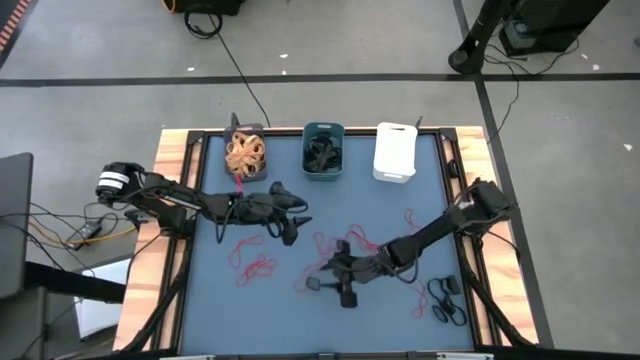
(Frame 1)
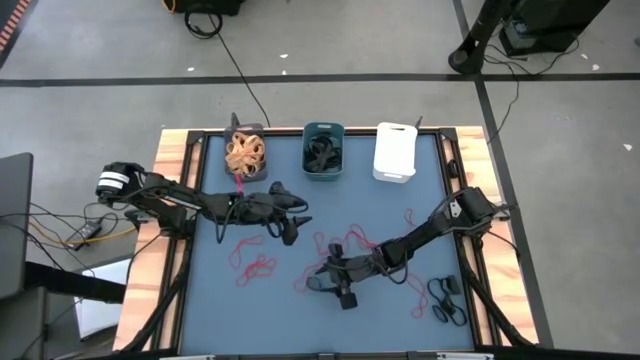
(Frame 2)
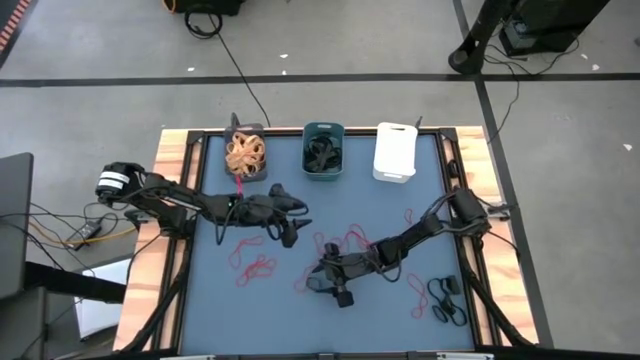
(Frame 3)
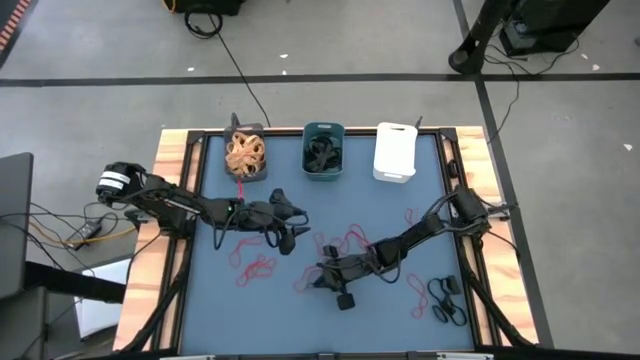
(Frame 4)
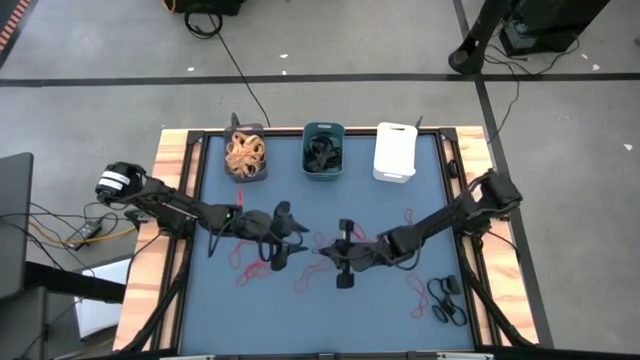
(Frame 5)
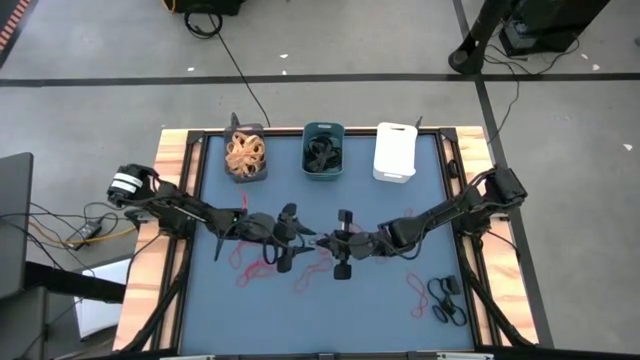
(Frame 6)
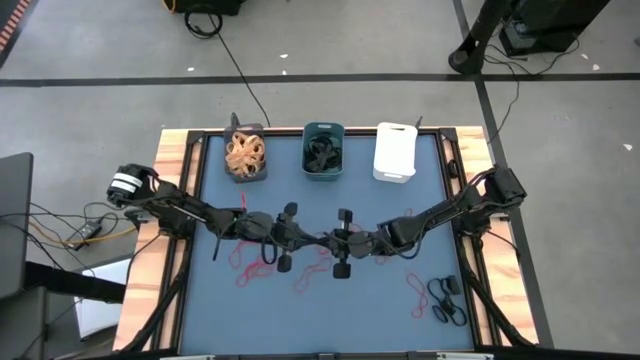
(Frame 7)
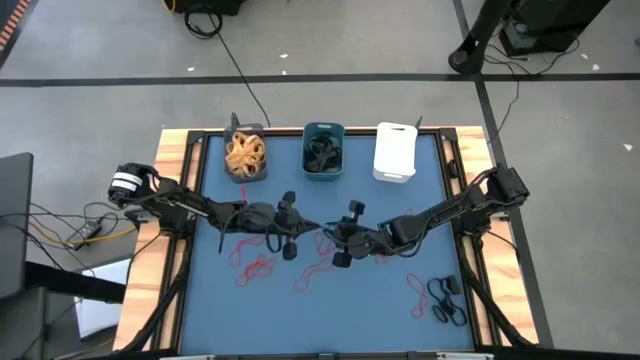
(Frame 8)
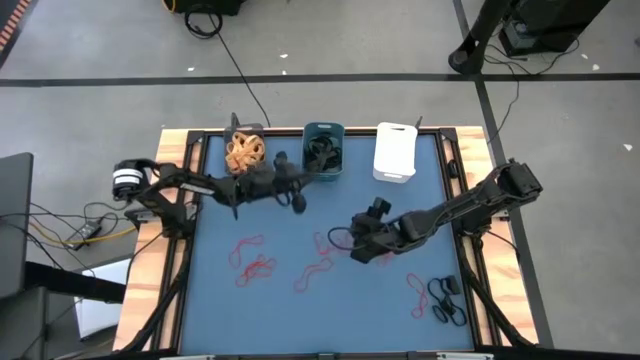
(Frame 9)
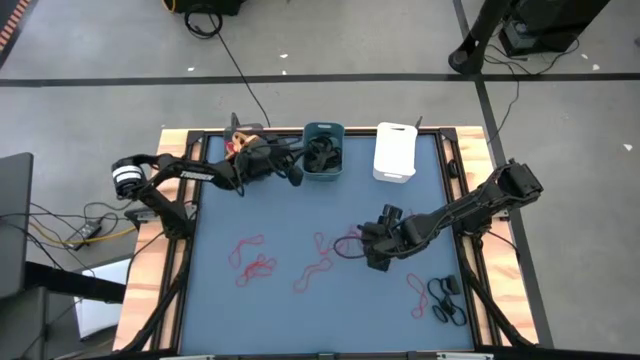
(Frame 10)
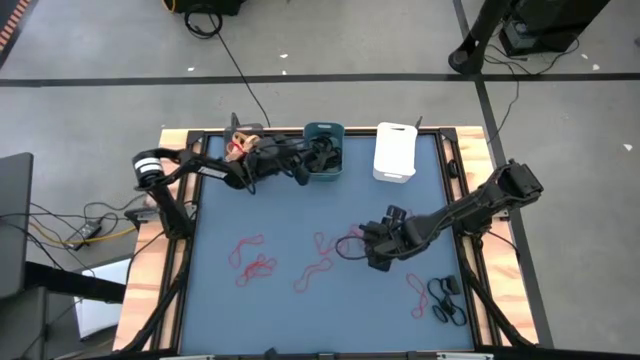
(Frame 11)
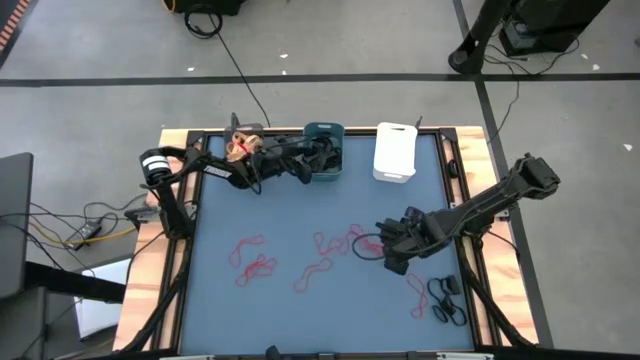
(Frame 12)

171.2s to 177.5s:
Task: Sort rubber bands into baskets
Put the black rubber band into the blue bin

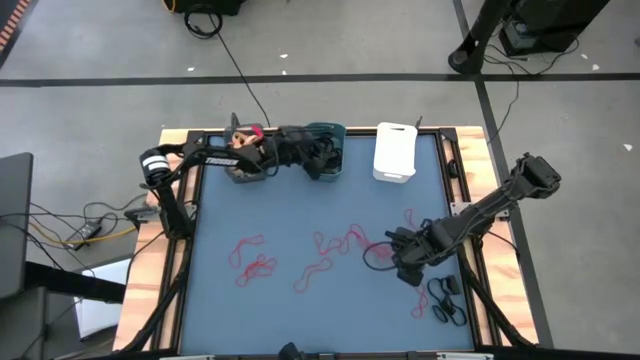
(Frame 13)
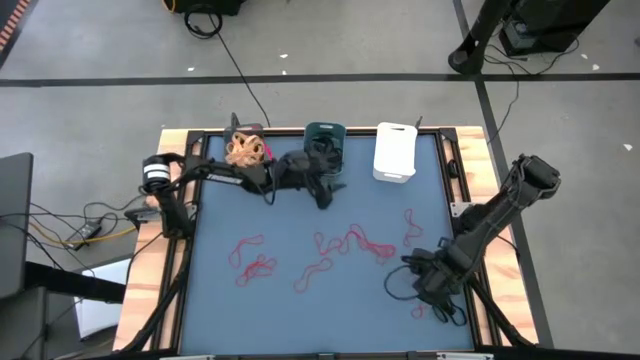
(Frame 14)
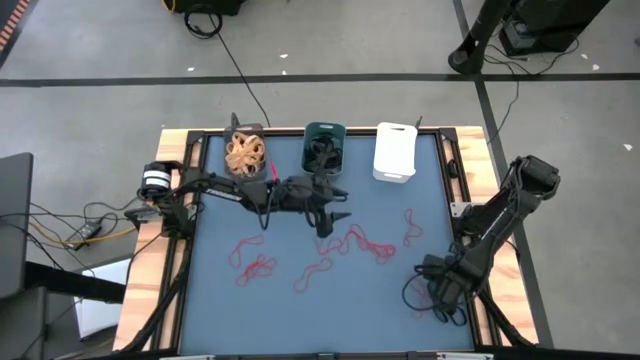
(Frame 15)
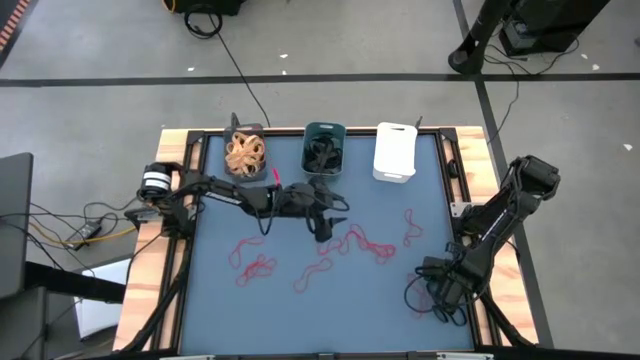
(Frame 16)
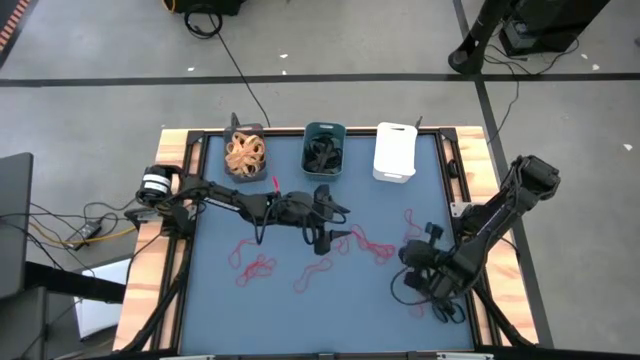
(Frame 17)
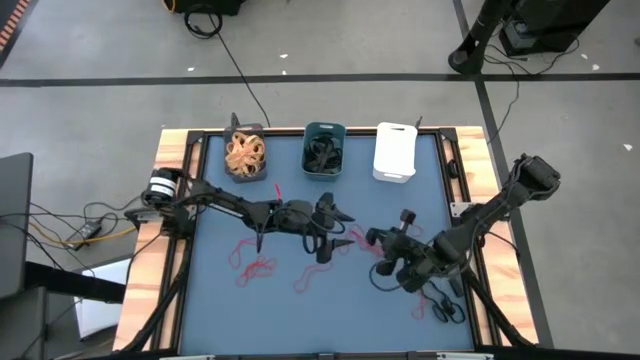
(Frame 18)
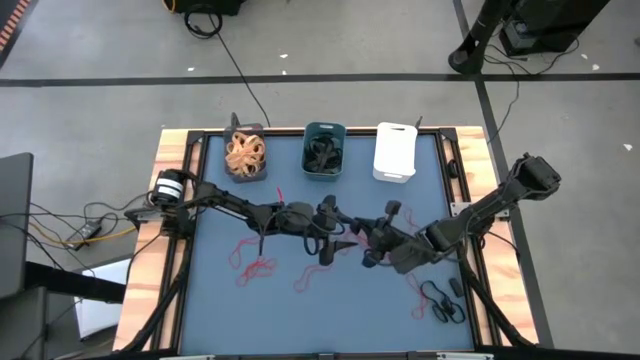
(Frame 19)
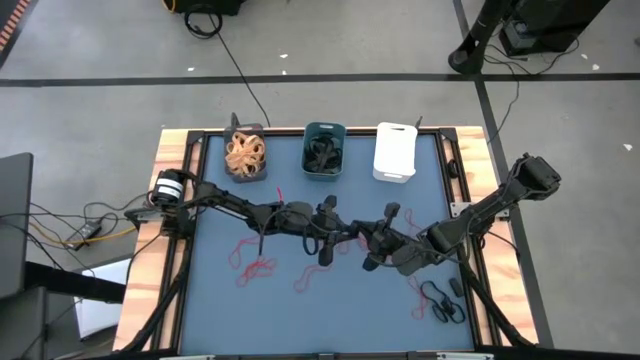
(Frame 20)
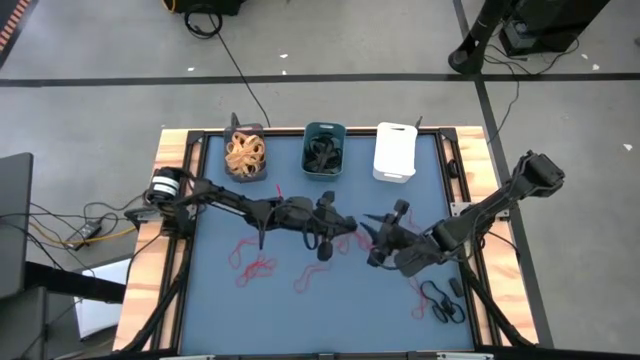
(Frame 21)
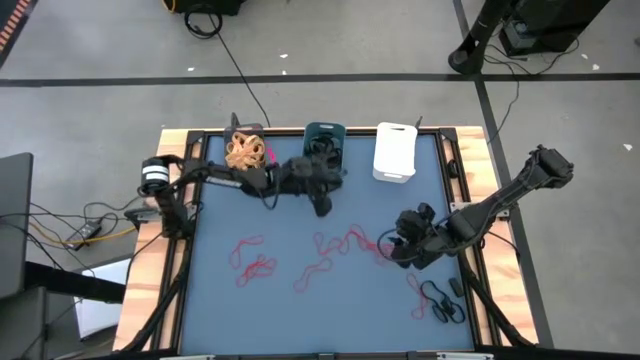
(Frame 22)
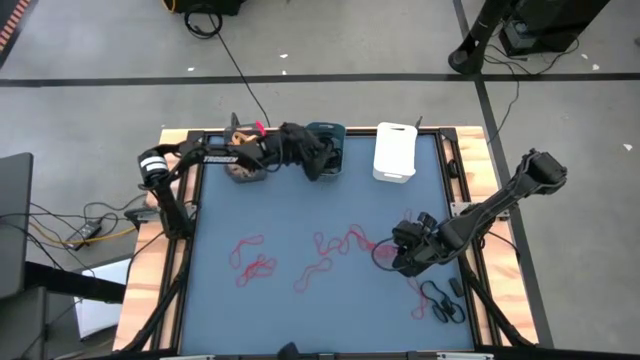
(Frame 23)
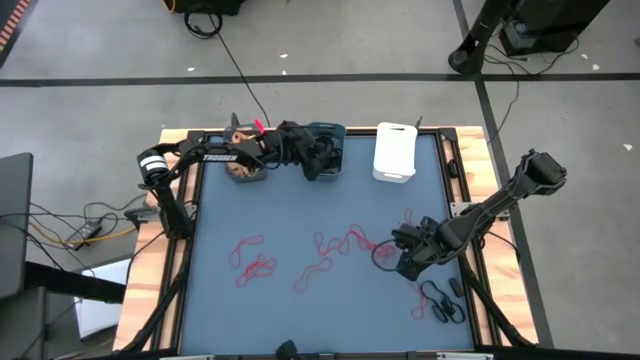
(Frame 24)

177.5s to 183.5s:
Put the black rubber band into the blue bin

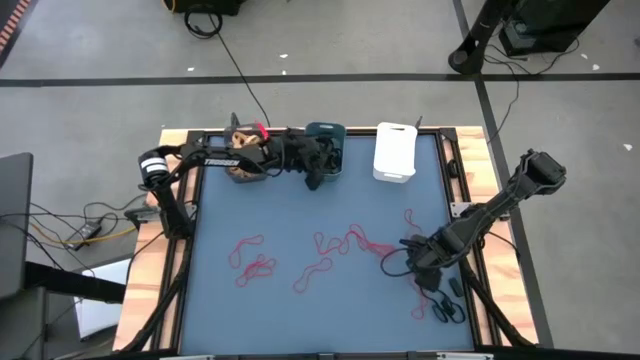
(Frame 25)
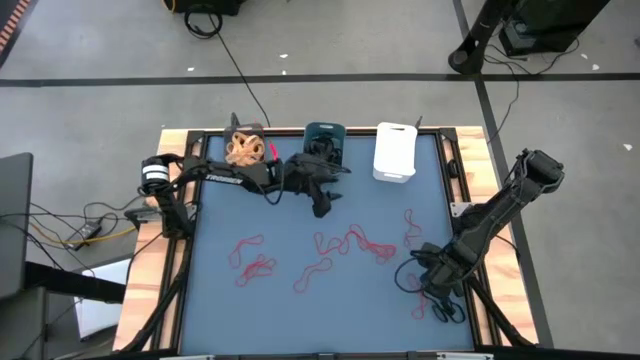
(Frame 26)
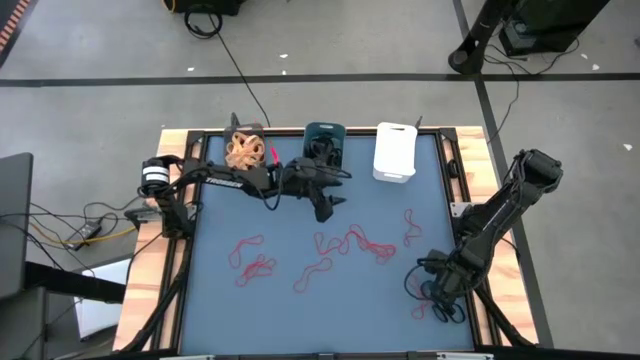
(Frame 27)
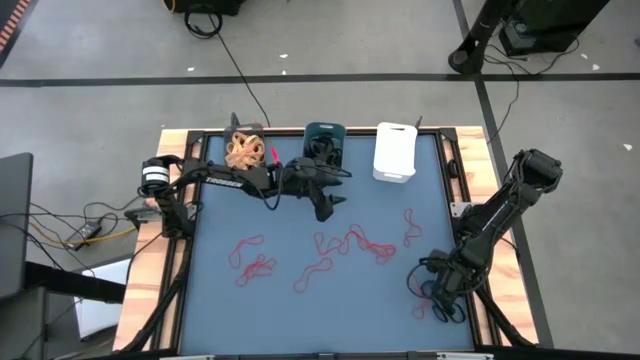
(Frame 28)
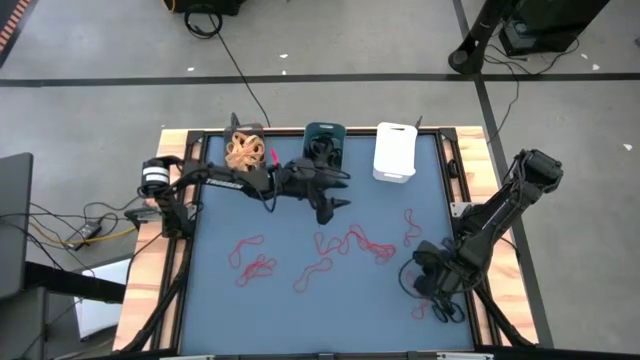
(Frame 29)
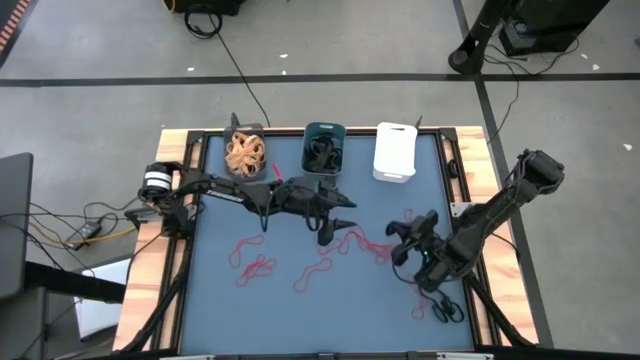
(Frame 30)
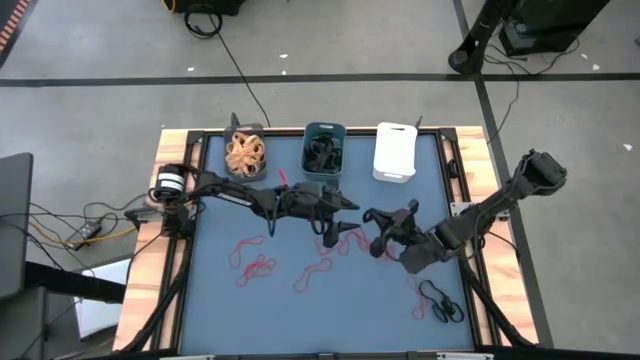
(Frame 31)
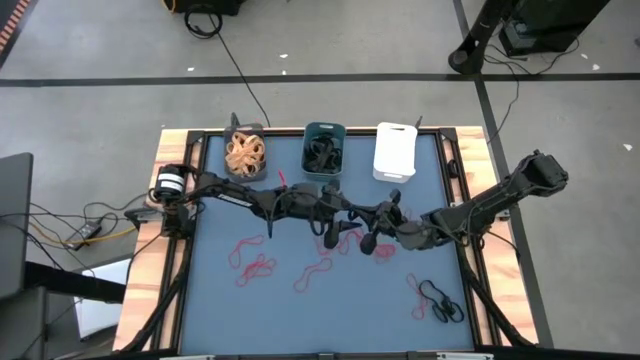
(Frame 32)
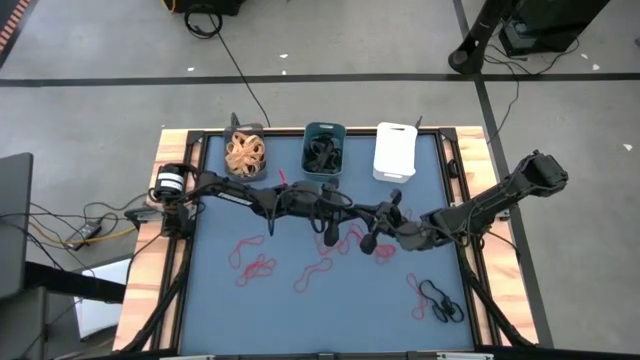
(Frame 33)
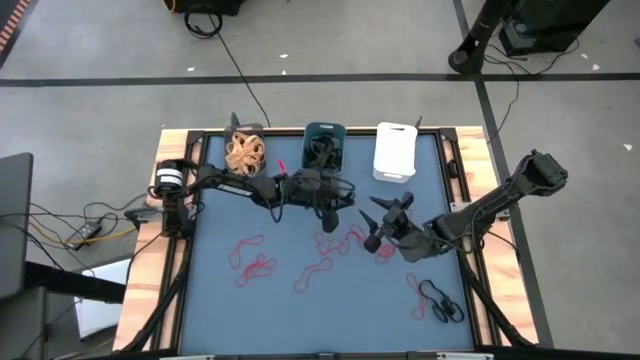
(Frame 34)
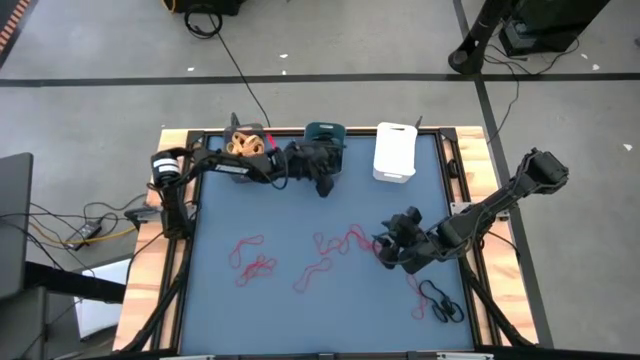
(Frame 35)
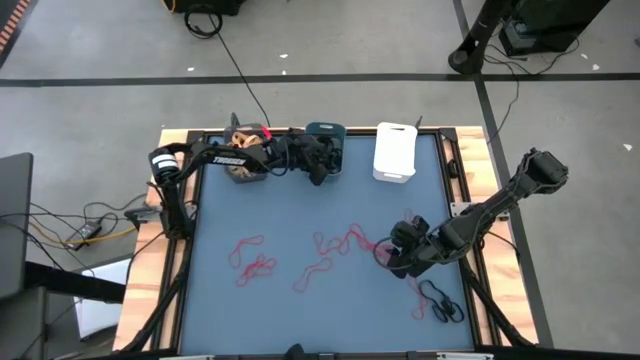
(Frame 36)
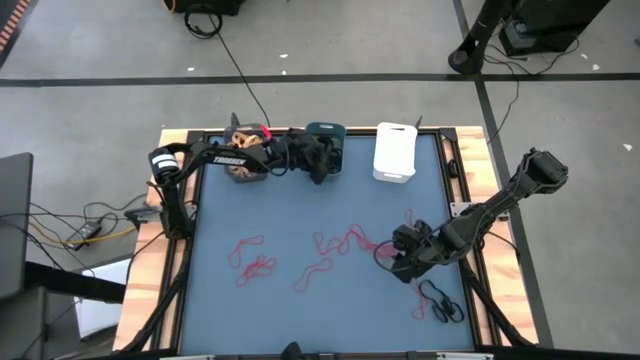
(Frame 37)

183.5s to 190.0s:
Put the black rubber band into the blue bin

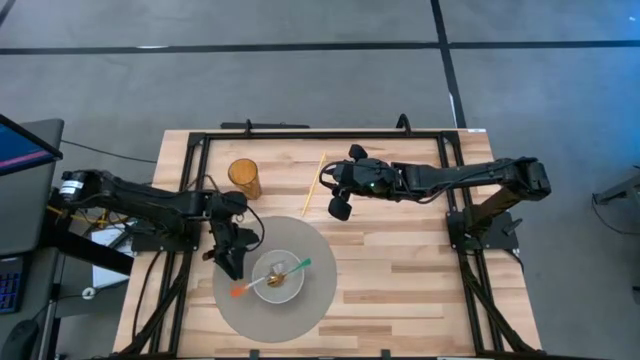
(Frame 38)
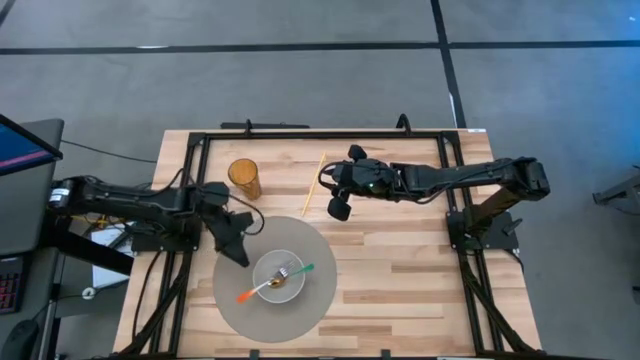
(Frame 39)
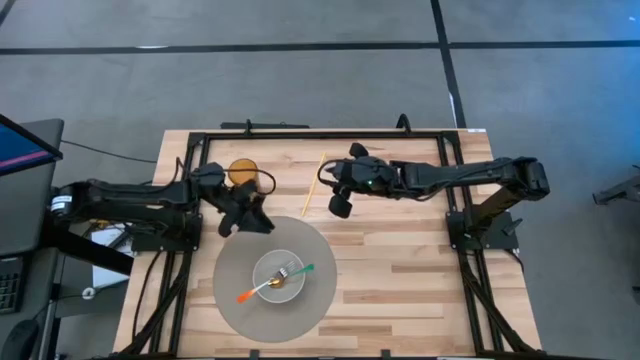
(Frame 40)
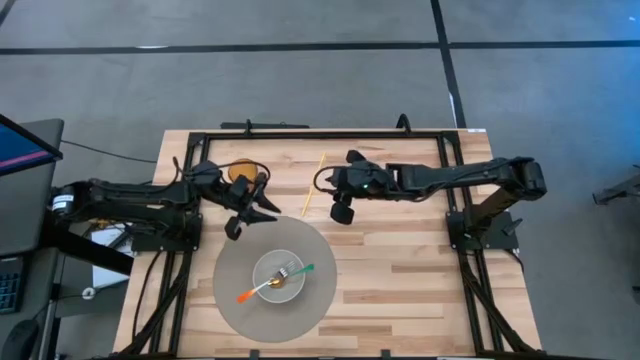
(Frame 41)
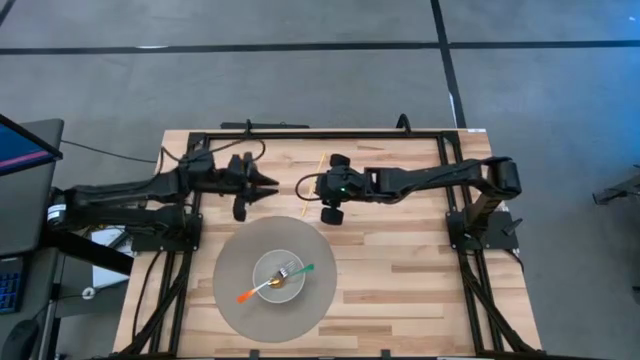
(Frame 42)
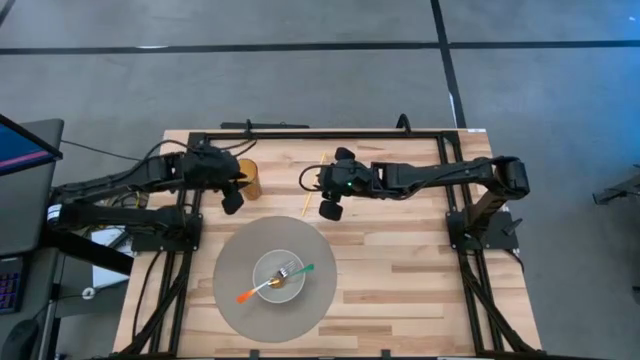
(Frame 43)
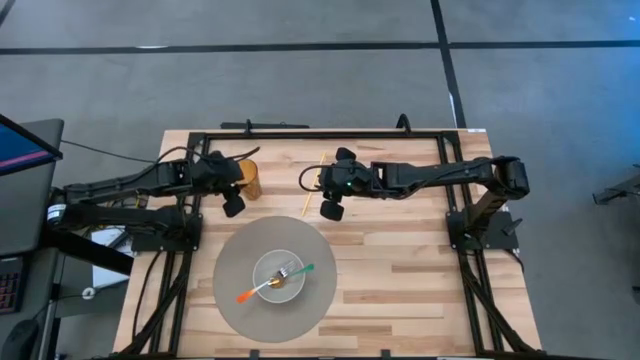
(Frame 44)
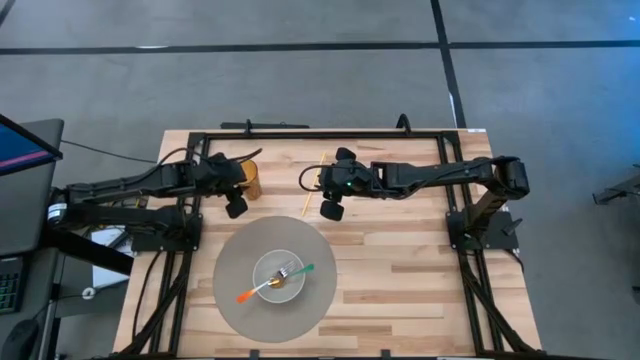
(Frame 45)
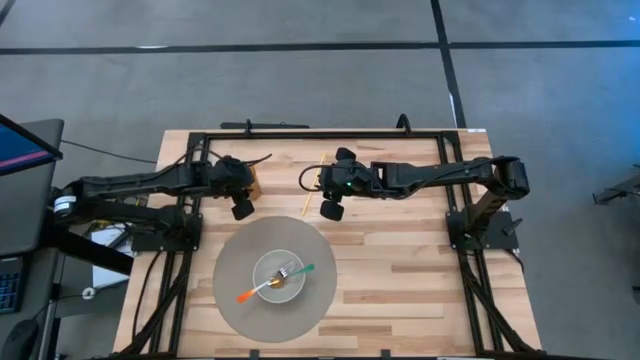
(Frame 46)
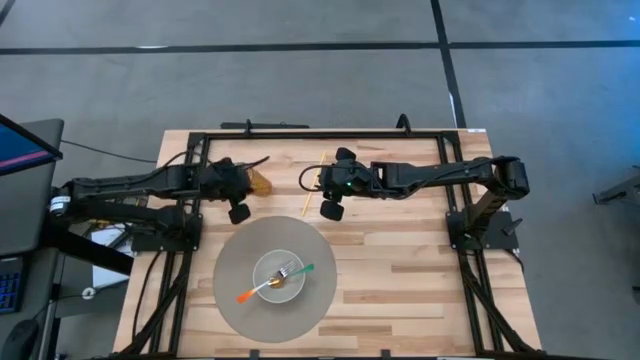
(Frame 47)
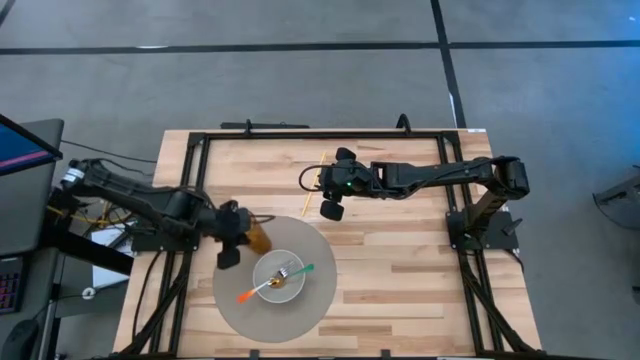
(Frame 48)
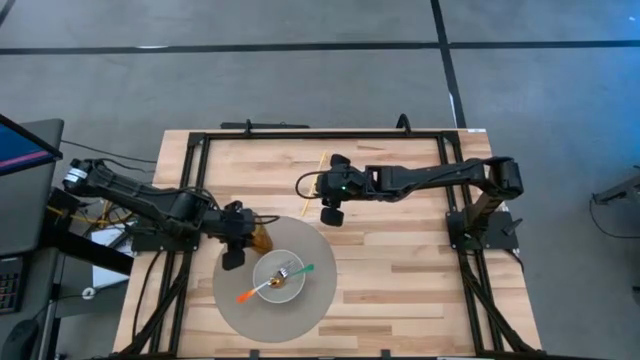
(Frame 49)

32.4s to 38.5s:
Task: Pick & Place Utensil
Put the brown cup on the gray mat to the top left of the gray bowl
